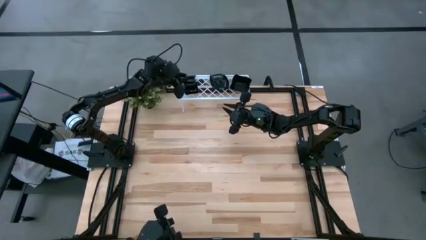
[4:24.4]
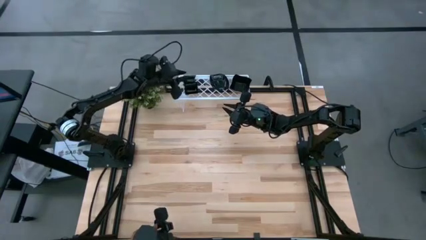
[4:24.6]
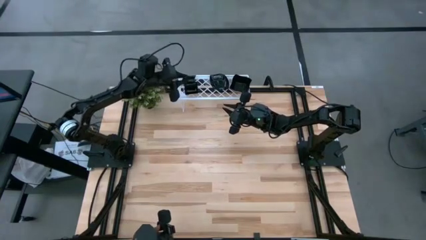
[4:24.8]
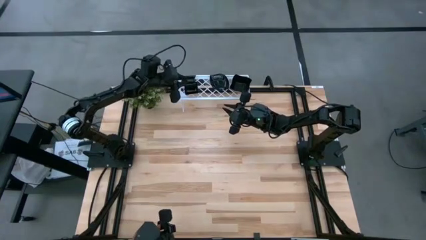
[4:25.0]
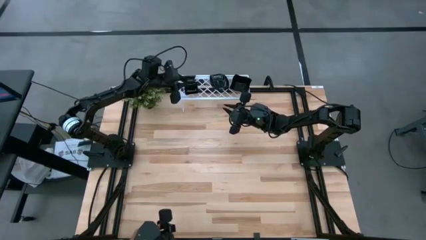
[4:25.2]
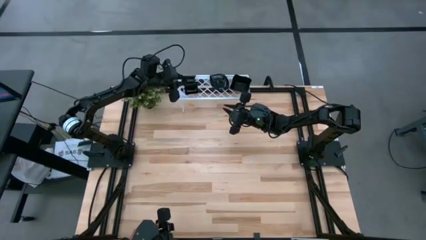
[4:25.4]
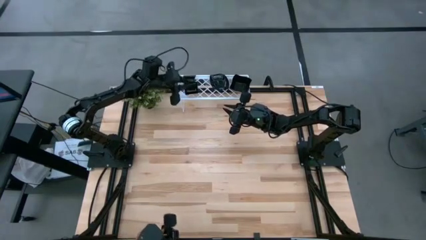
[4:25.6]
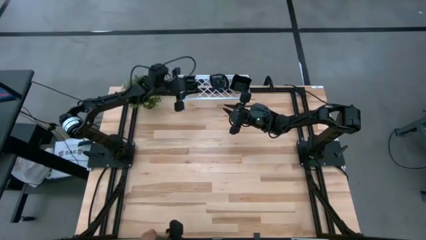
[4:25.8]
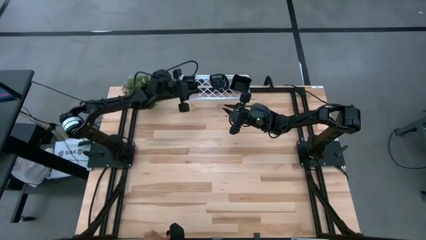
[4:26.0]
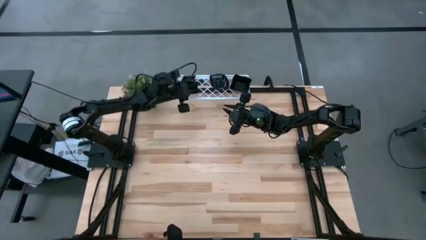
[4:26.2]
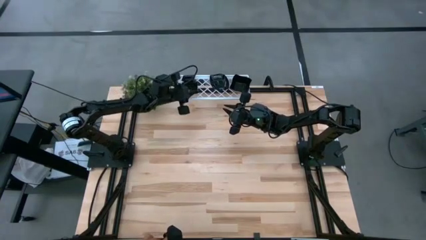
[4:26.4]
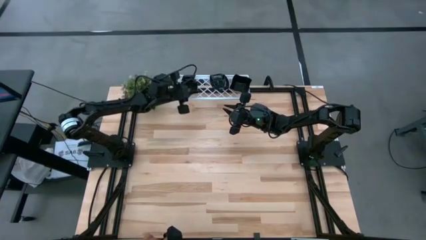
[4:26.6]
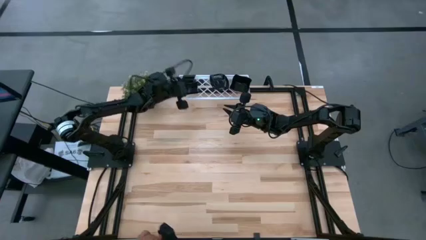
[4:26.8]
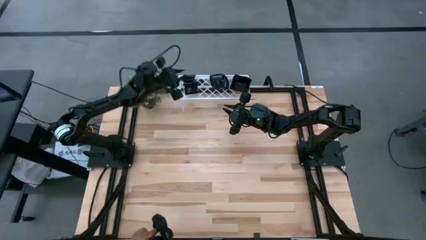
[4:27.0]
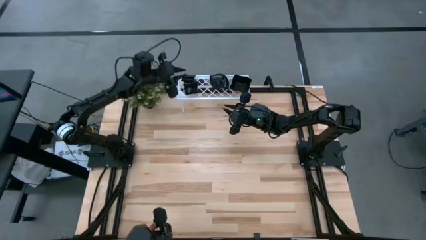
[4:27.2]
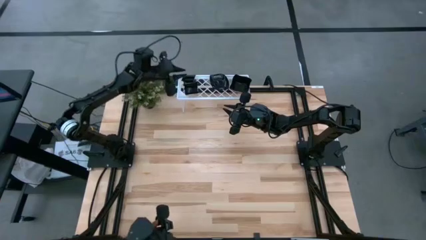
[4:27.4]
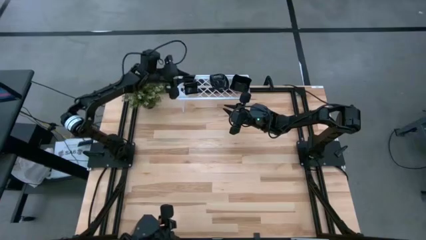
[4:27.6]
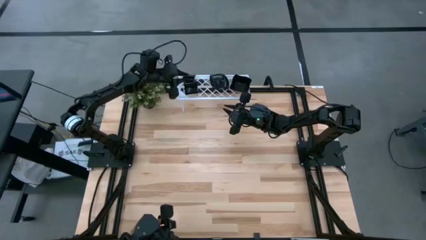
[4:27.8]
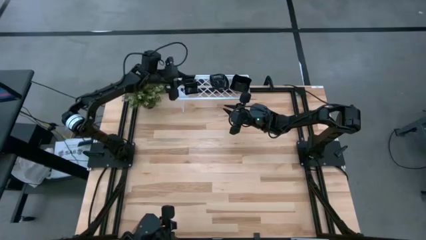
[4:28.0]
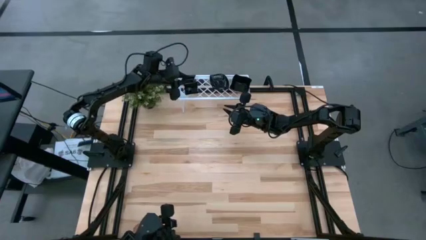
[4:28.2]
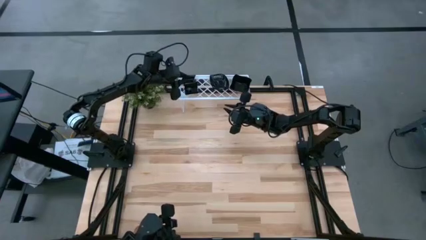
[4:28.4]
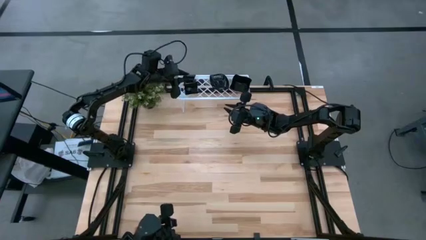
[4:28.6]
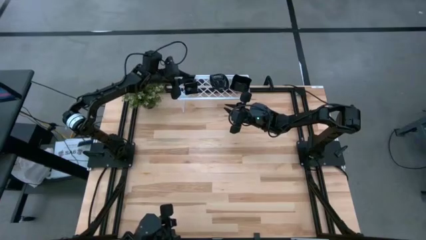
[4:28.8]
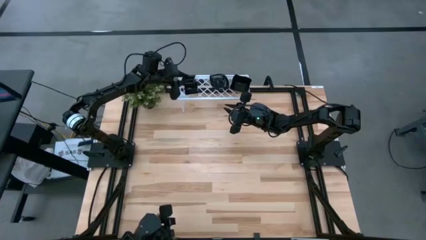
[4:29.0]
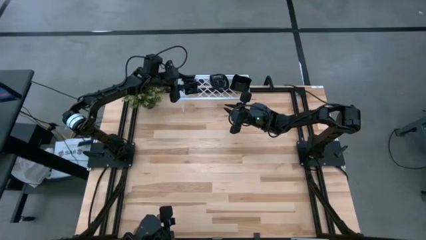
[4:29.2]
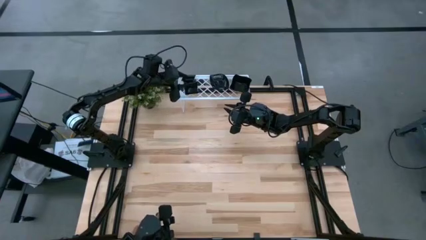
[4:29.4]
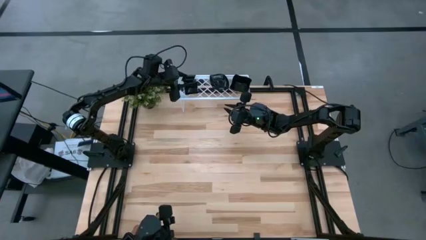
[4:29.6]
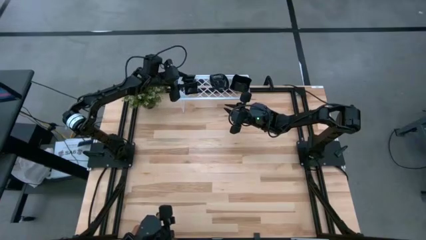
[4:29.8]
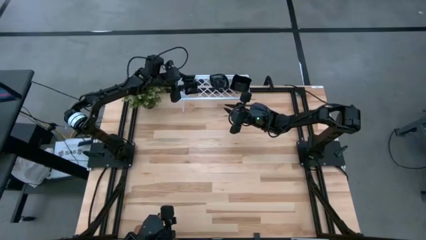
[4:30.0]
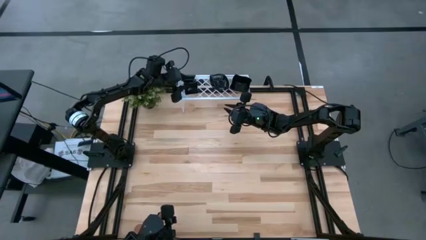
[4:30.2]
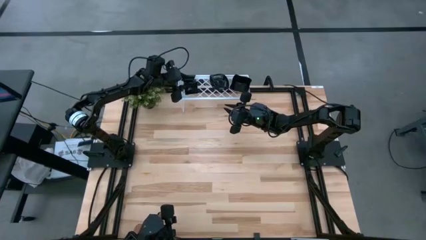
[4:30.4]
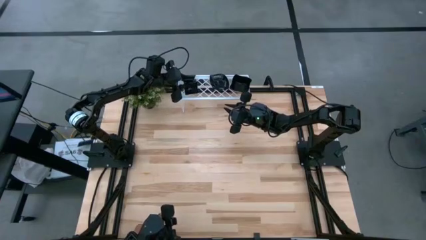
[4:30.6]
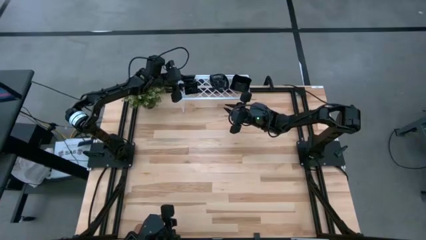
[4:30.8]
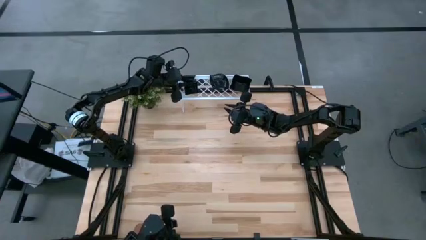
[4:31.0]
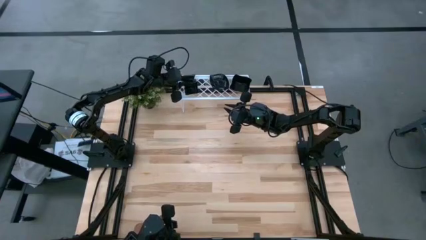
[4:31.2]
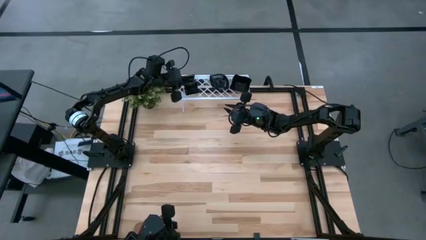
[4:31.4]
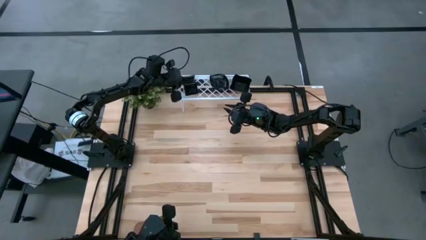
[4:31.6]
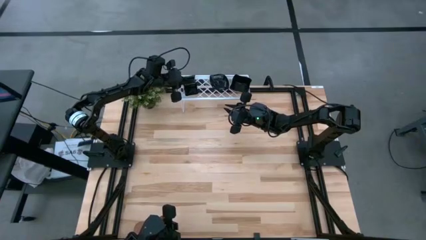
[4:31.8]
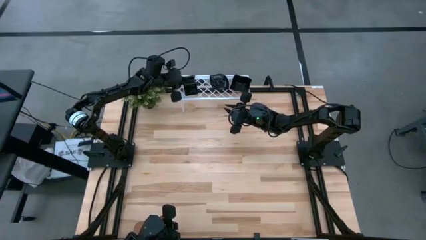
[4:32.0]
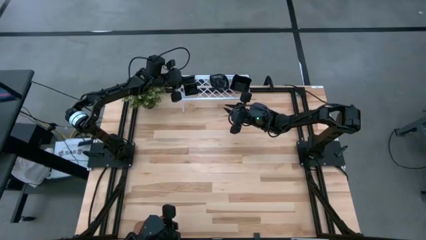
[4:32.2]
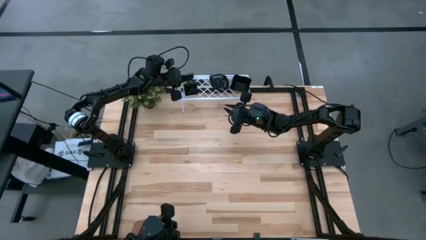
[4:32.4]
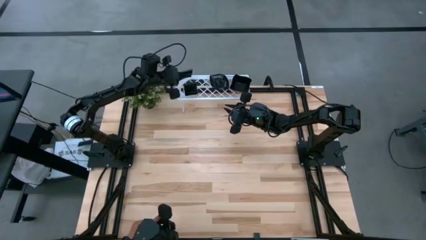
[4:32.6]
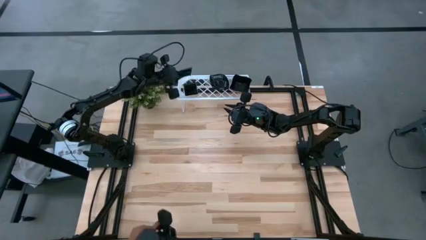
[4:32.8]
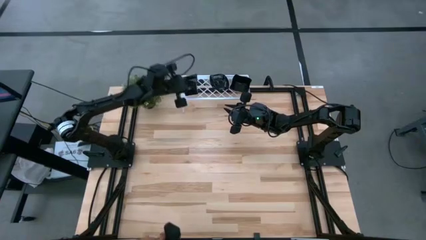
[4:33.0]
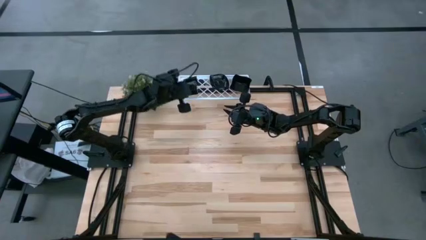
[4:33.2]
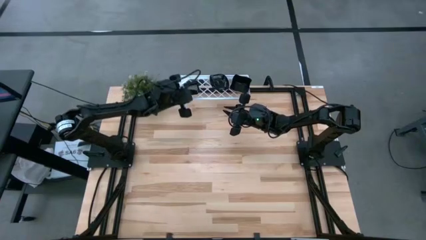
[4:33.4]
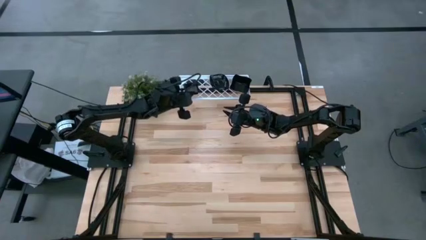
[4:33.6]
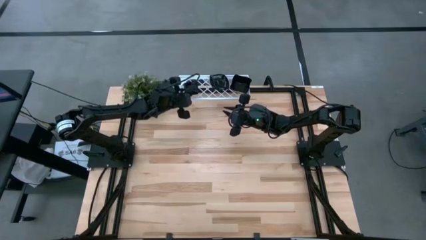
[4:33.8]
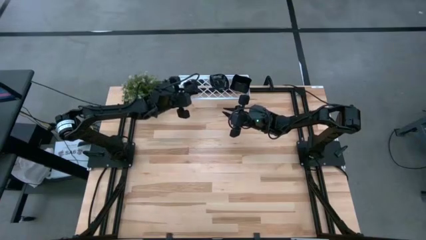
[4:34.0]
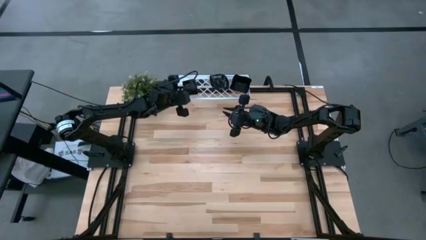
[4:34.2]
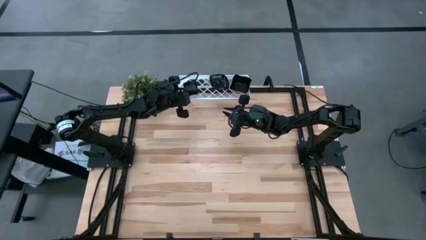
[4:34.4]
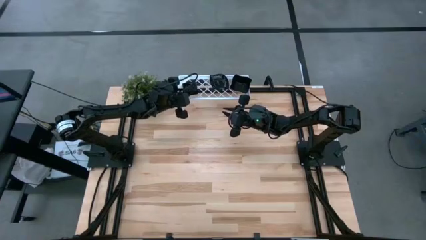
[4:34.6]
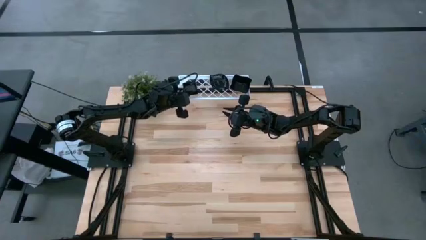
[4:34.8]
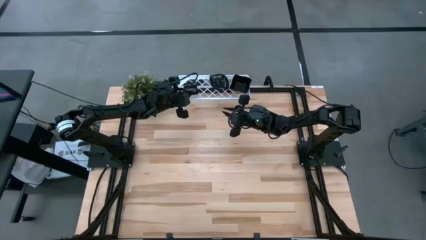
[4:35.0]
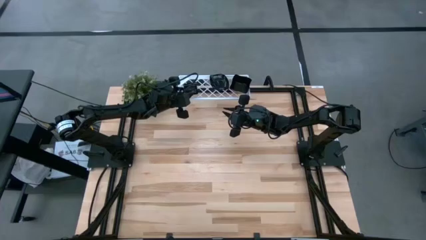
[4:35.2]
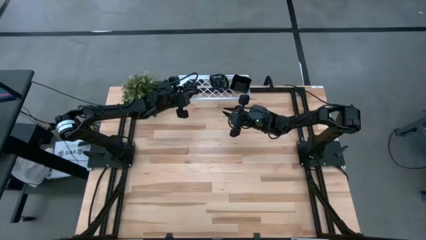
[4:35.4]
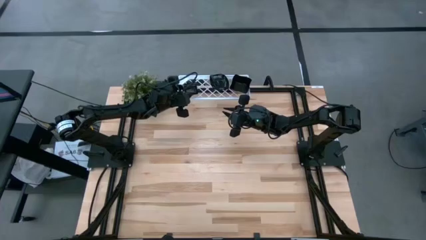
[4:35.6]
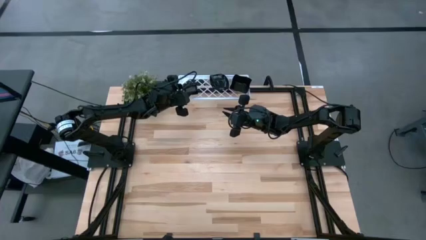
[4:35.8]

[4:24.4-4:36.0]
Task: Pick & Place Mini shaped plates
Stack the black square plate on top of the black square plate on the shelf

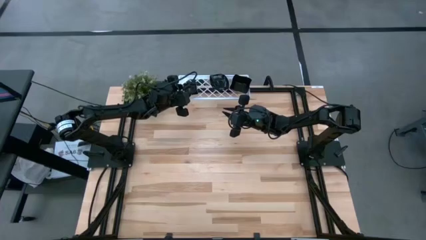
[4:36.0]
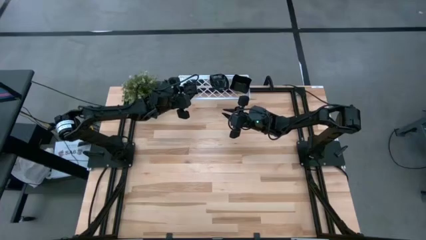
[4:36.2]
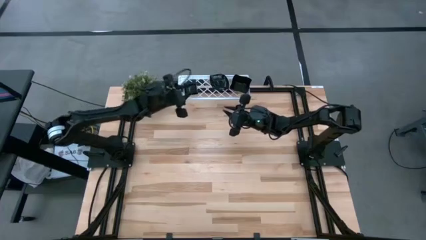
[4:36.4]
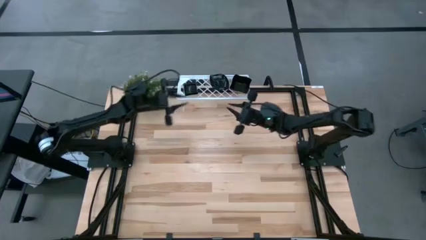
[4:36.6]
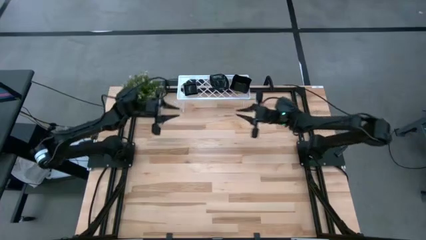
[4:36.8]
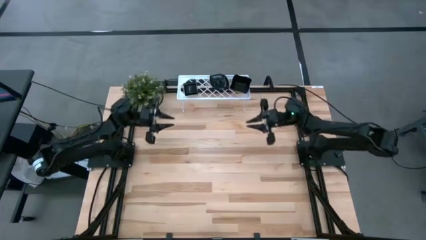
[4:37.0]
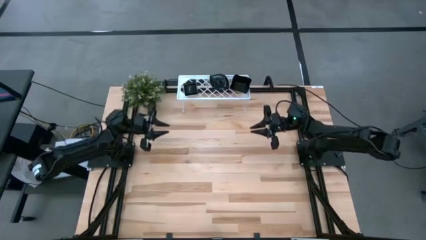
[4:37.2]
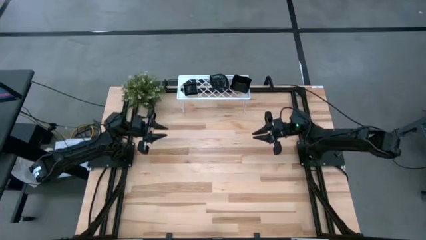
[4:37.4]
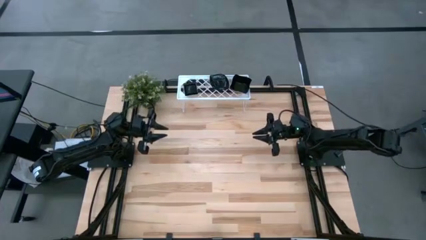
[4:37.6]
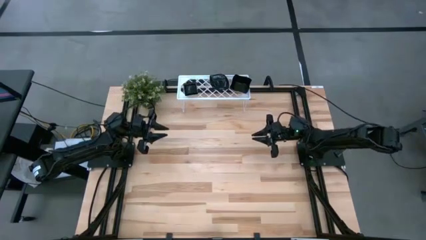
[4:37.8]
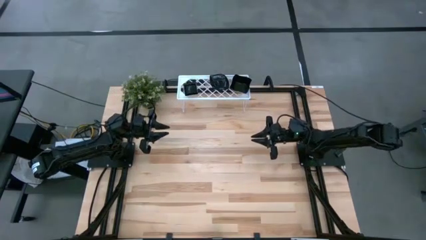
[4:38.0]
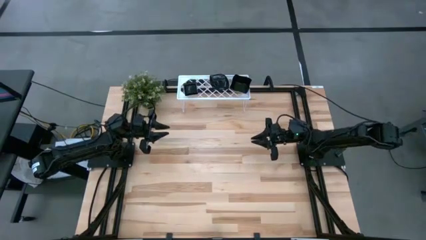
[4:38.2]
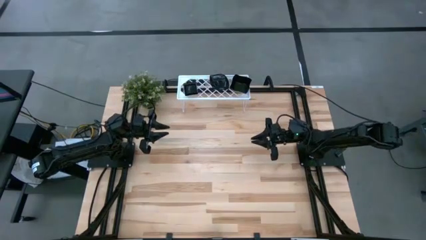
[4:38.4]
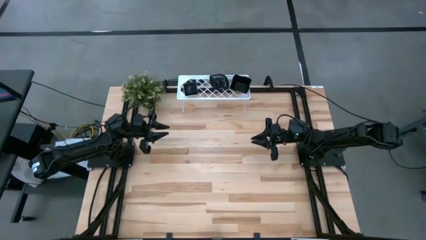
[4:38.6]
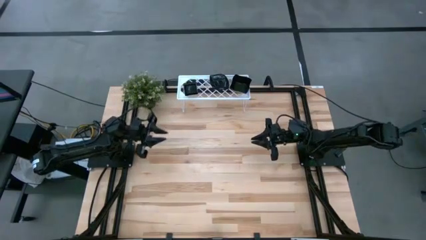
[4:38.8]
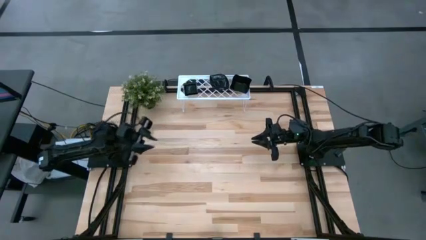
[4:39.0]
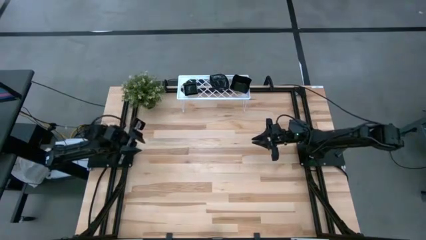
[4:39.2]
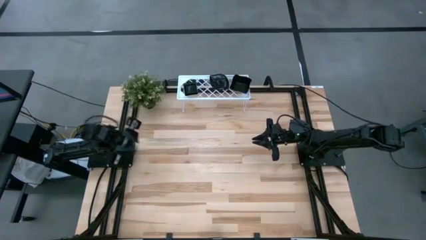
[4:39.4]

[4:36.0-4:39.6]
Return to Home Position
